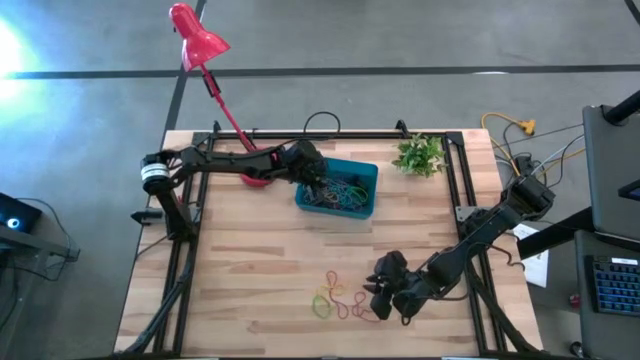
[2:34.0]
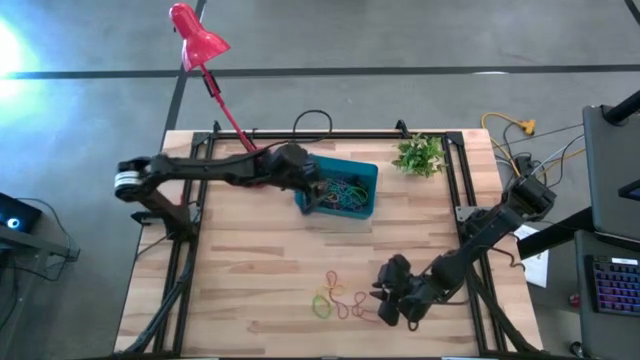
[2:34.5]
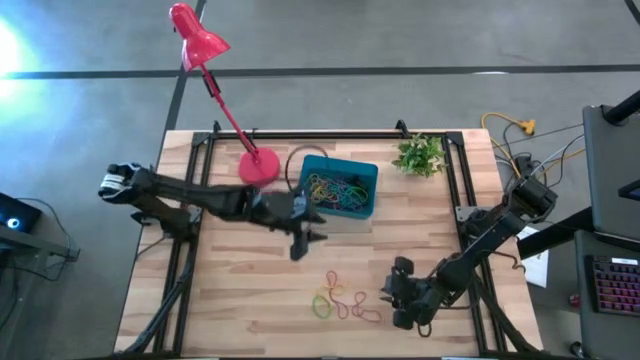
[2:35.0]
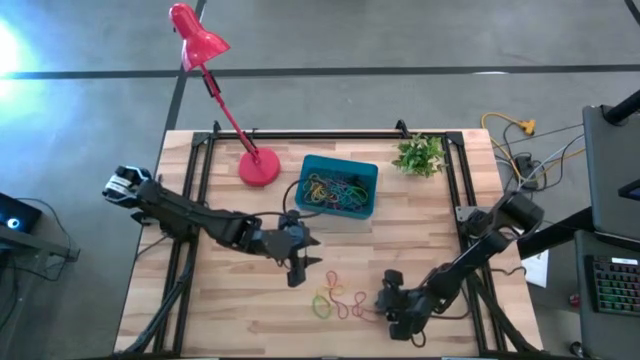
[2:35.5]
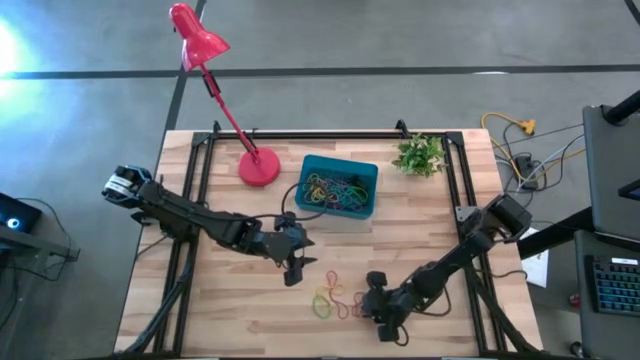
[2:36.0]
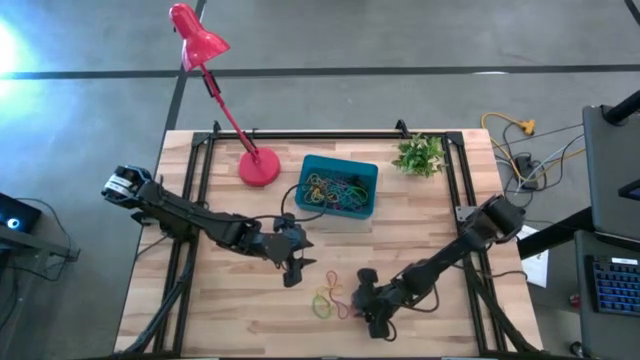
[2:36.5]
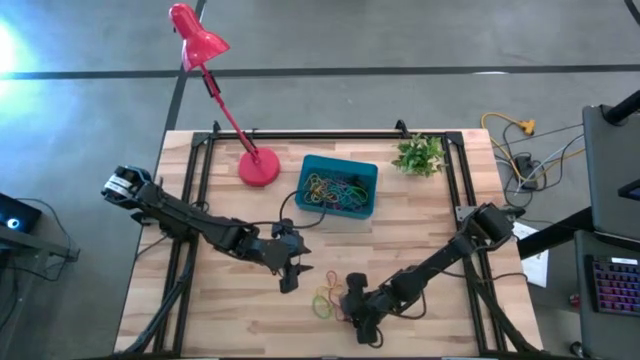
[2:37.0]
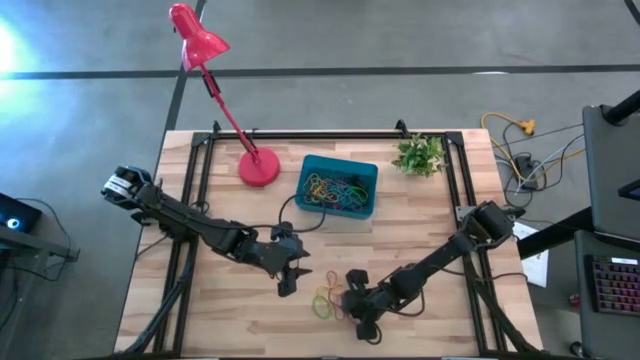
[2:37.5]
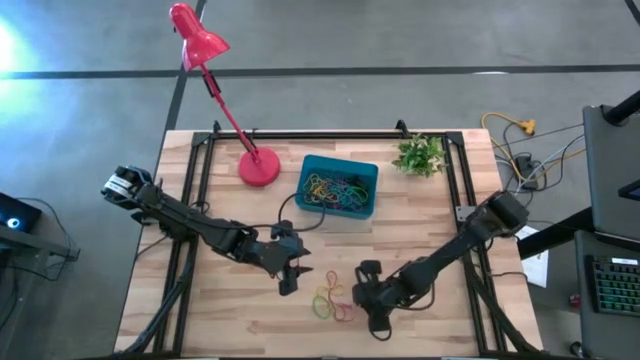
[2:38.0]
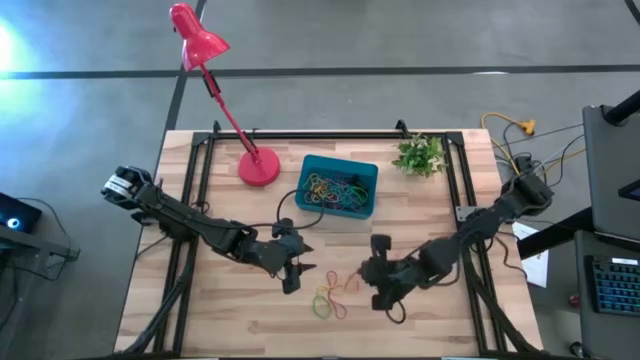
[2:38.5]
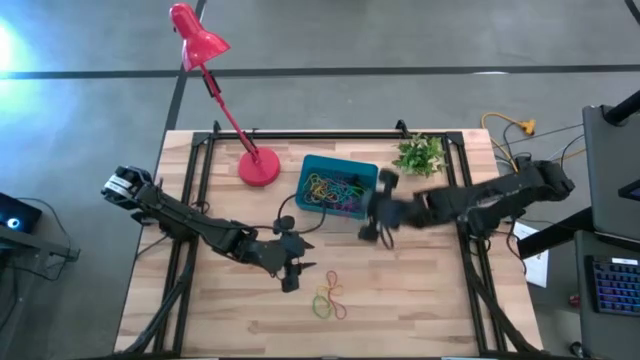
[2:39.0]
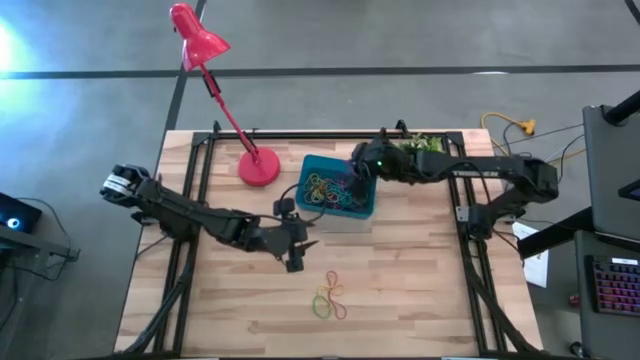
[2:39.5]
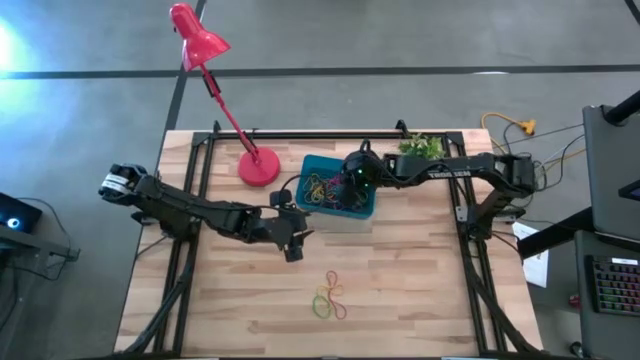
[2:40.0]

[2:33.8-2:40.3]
Task: Pick and place rubber bands into bin
Put the red rubber band into the blue bin

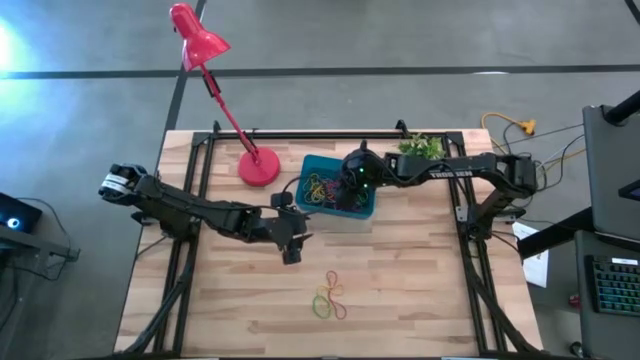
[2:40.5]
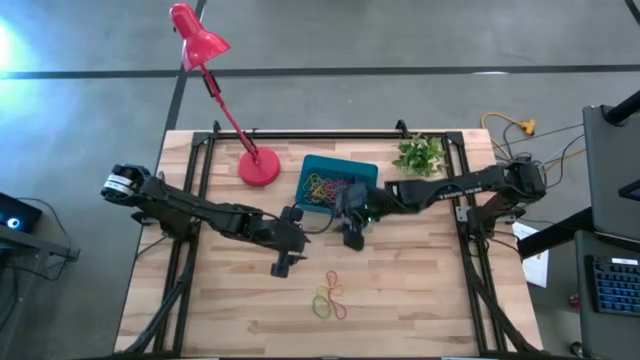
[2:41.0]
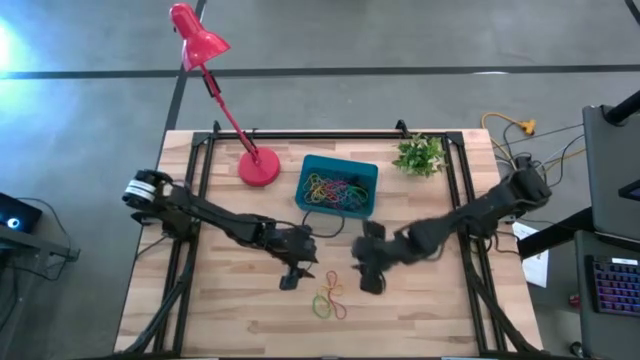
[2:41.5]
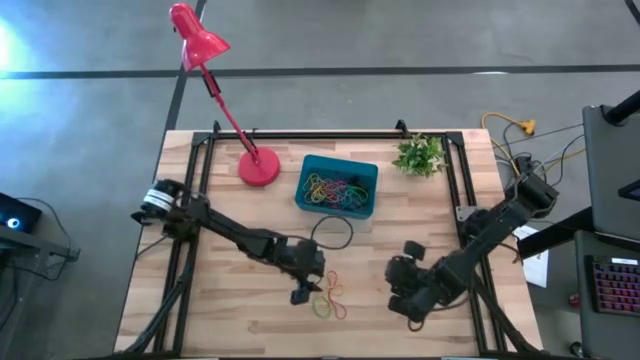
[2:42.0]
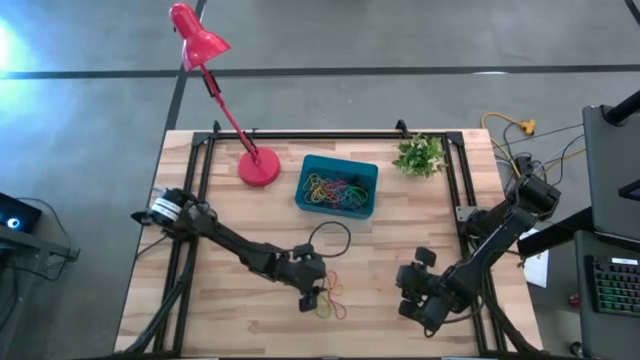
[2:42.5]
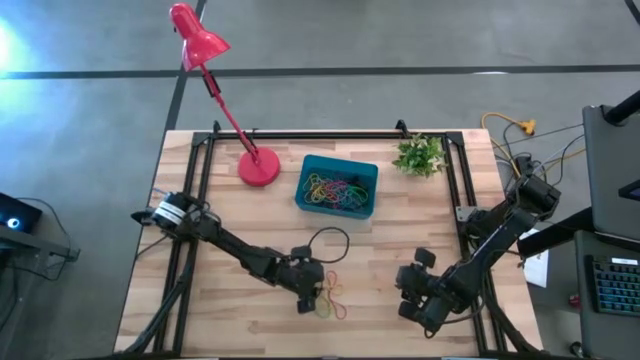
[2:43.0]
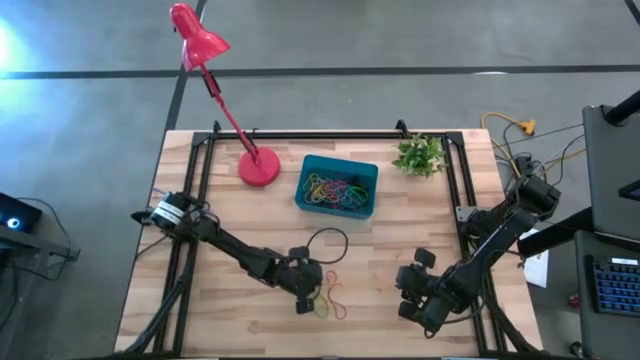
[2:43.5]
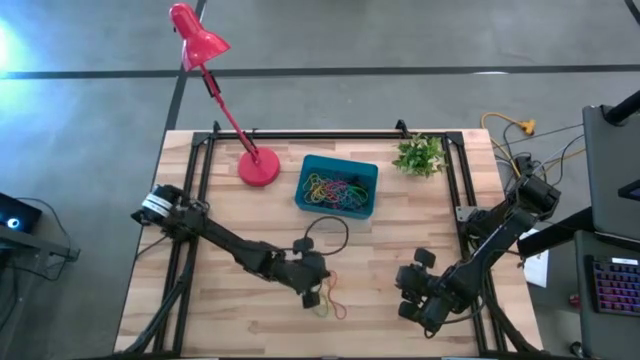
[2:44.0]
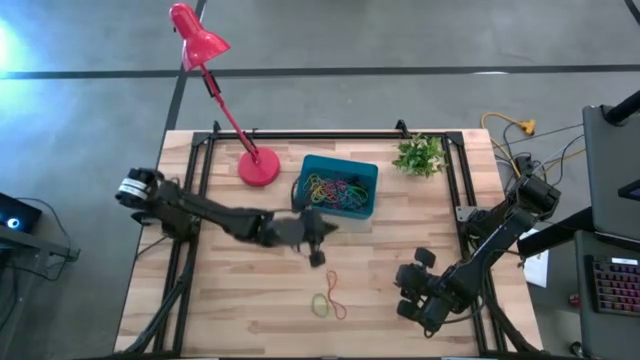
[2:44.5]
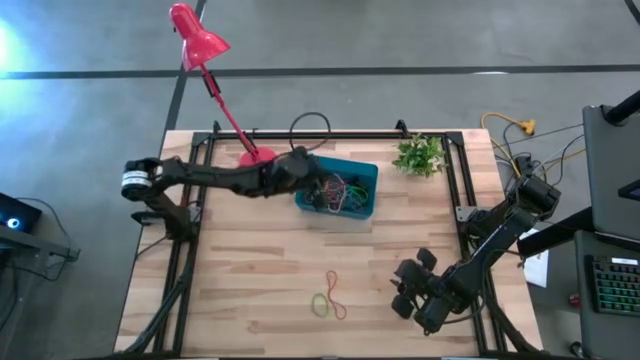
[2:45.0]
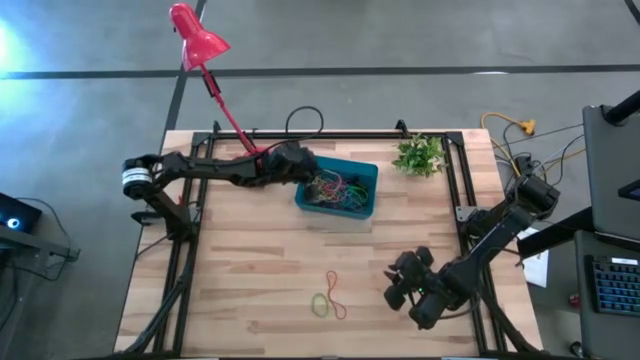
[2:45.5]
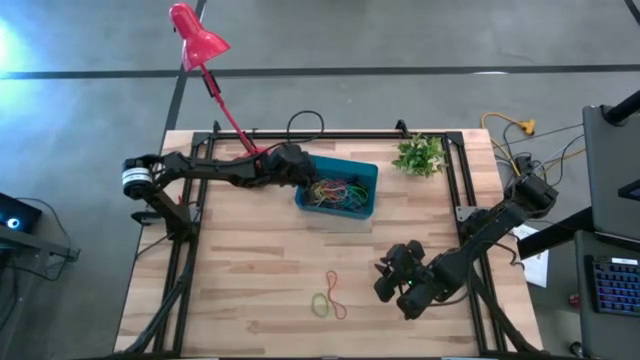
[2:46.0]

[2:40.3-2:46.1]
Put the yellow rubber band into the blue bin

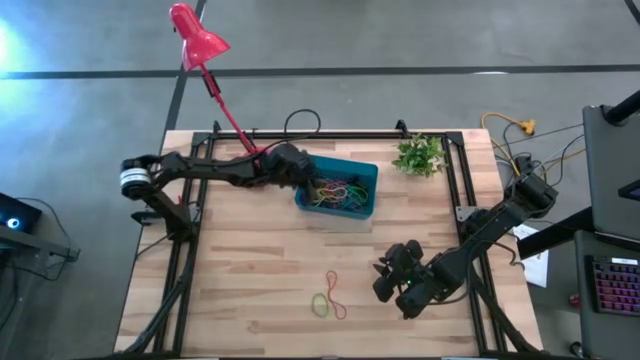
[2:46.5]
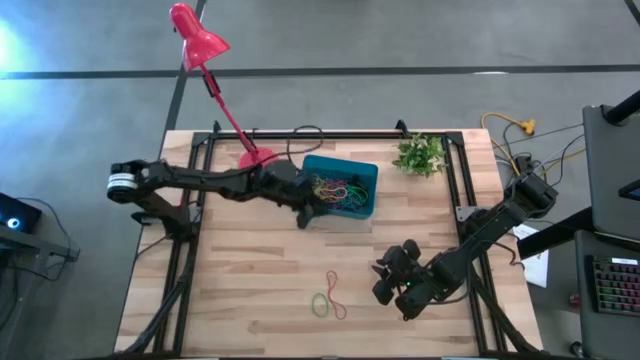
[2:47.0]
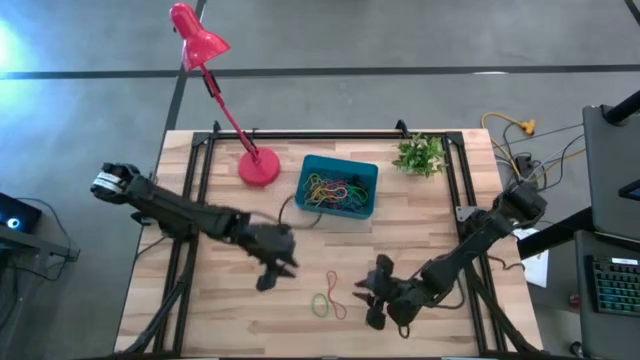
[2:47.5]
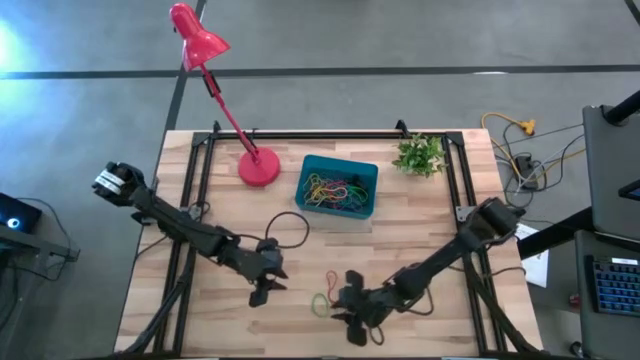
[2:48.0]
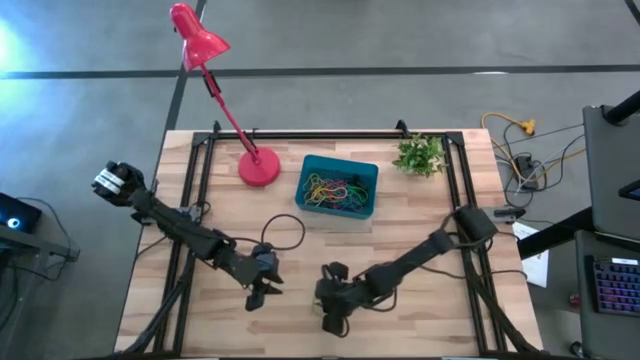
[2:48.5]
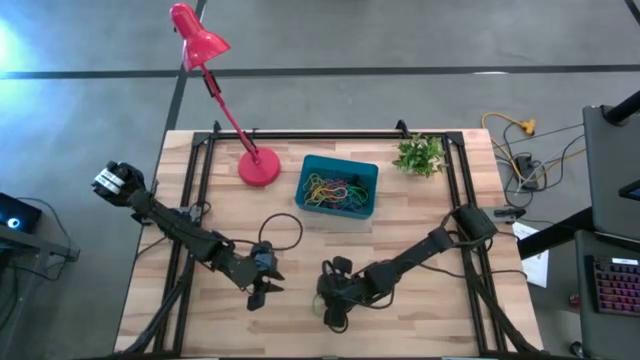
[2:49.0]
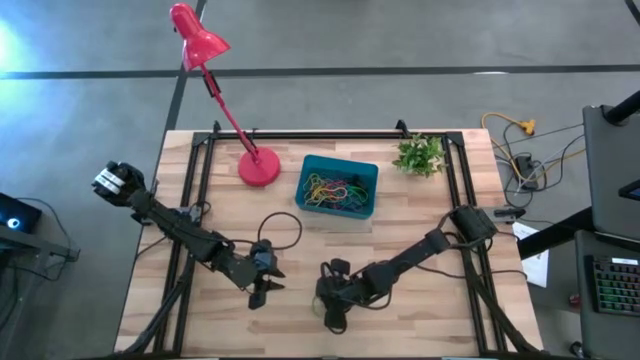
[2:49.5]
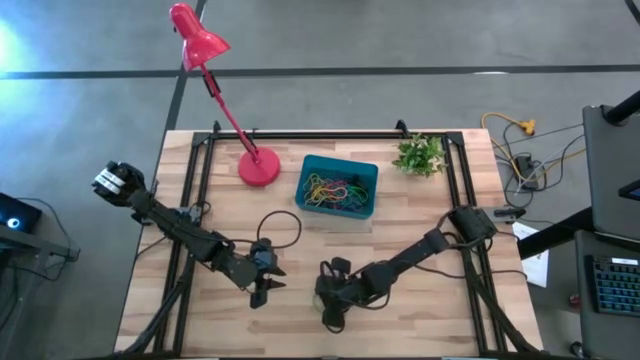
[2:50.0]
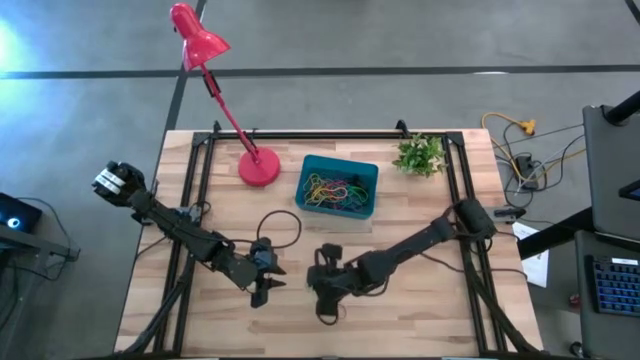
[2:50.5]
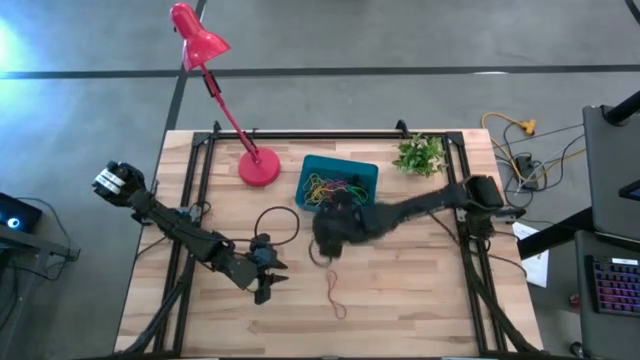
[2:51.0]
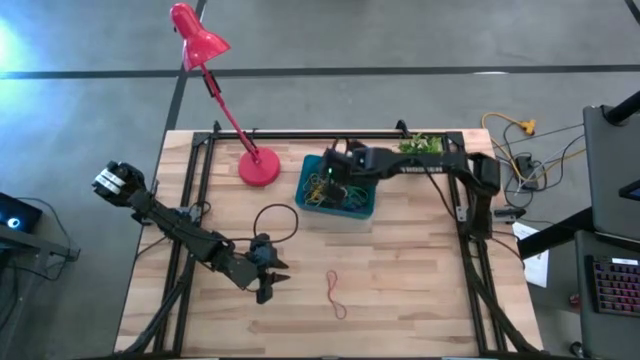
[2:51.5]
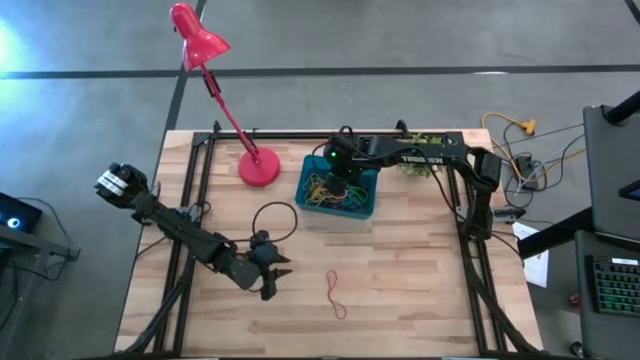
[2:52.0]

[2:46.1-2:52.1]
Put the green rubber band into the blue bin

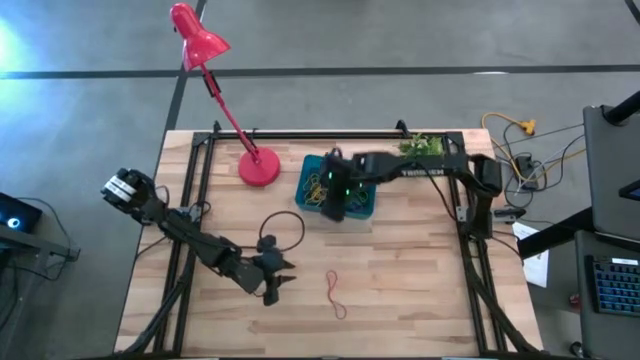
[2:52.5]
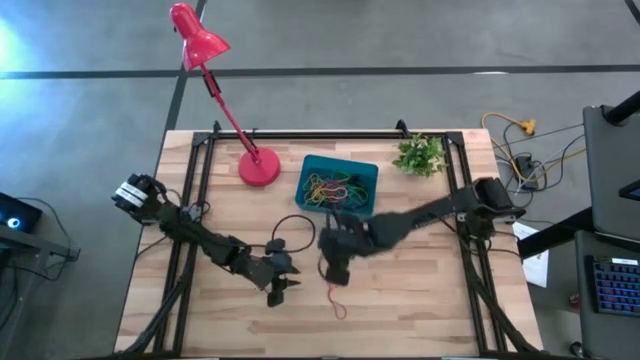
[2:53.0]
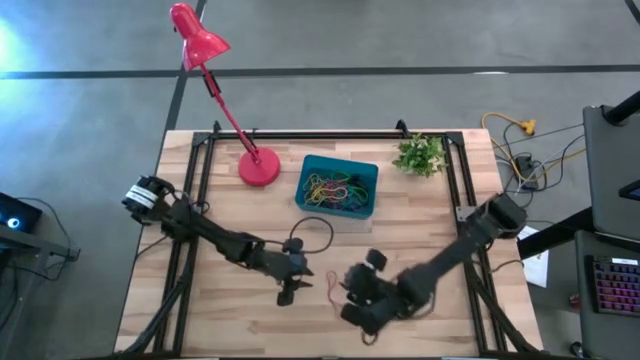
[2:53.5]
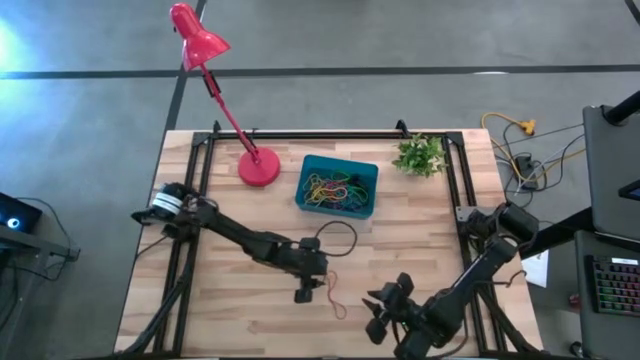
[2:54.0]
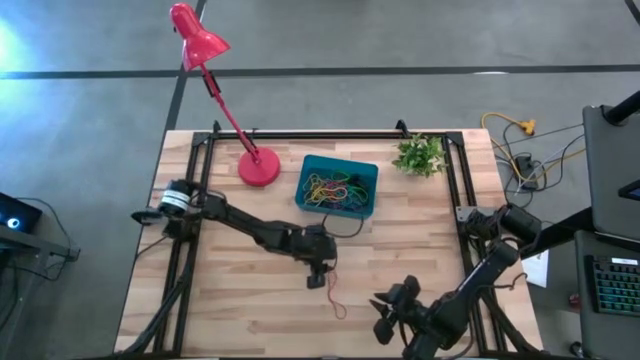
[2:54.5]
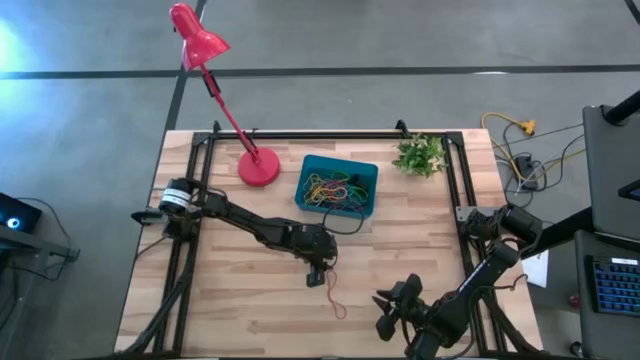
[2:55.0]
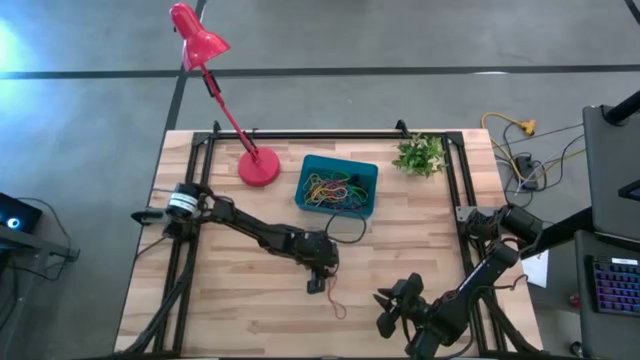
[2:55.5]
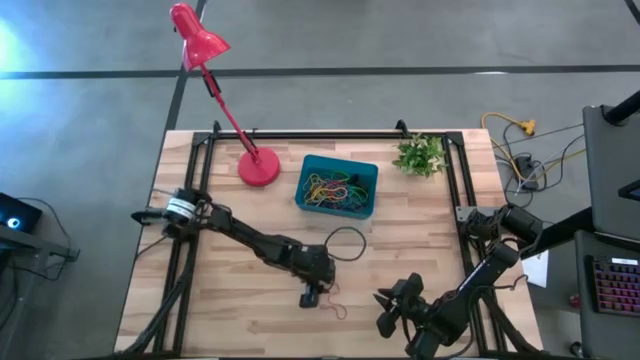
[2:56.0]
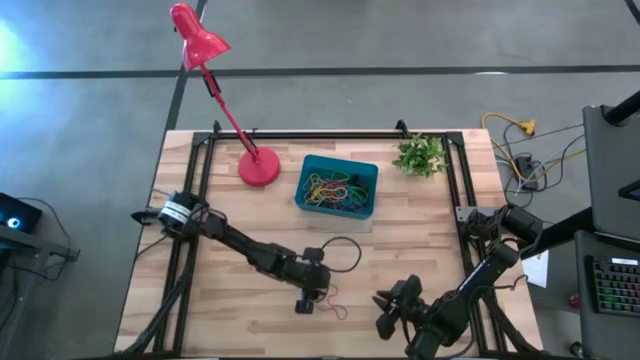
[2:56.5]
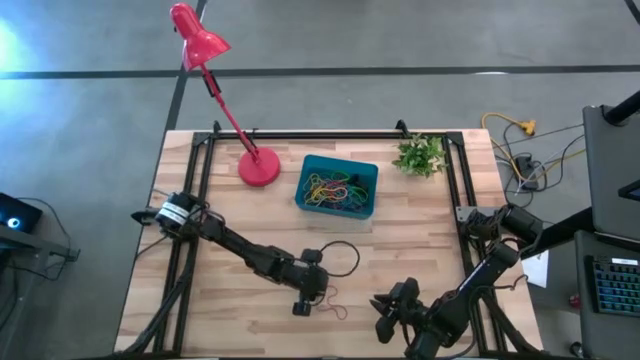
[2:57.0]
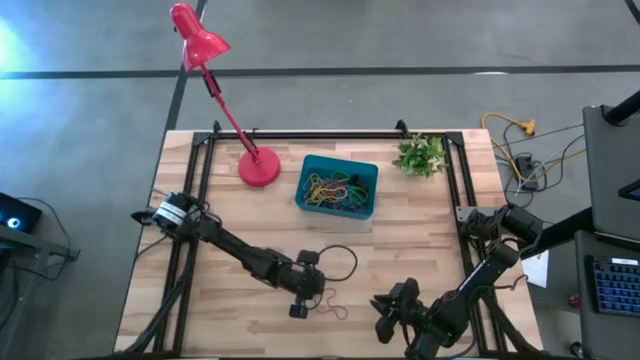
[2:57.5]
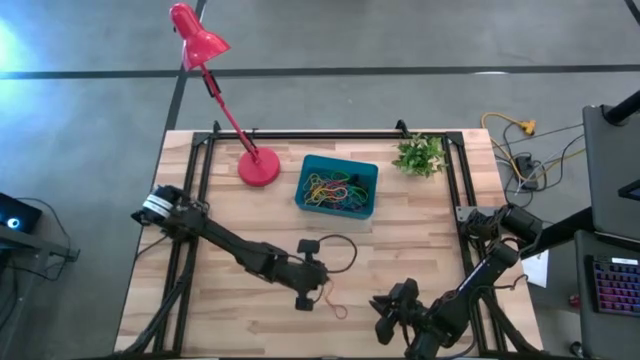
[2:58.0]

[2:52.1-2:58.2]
Put the red rubber band into the blue bin
